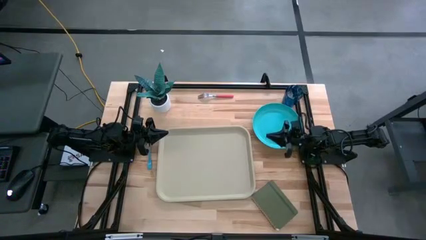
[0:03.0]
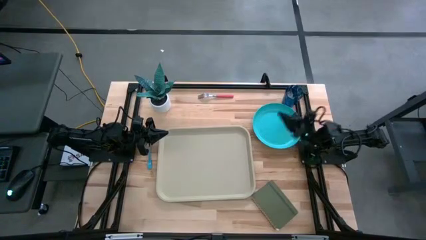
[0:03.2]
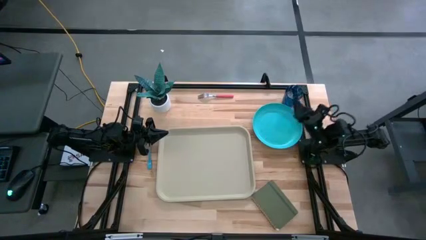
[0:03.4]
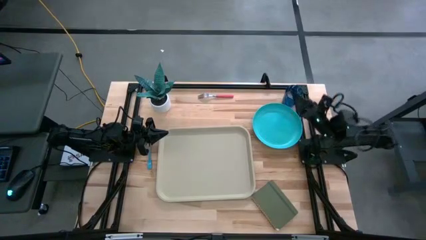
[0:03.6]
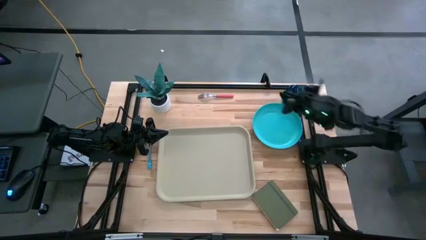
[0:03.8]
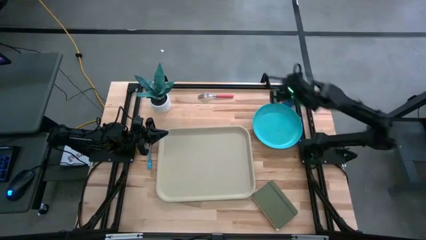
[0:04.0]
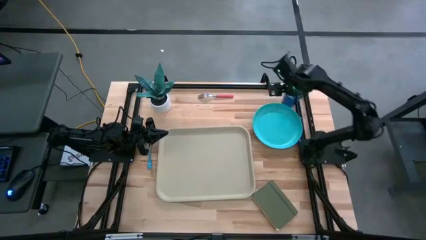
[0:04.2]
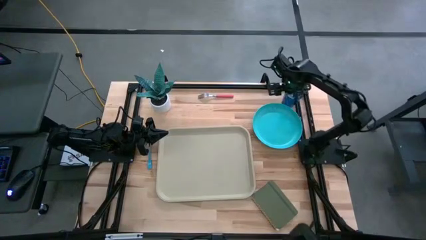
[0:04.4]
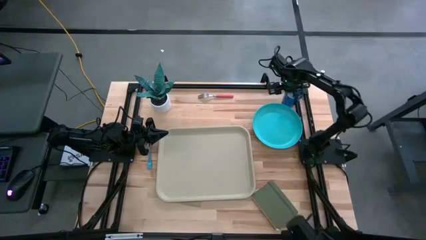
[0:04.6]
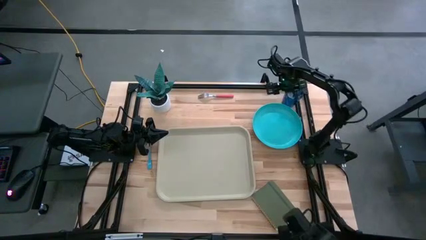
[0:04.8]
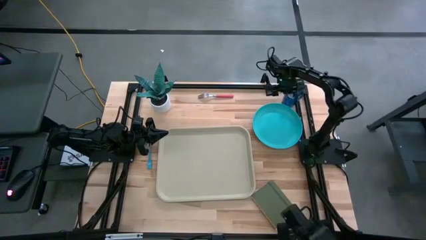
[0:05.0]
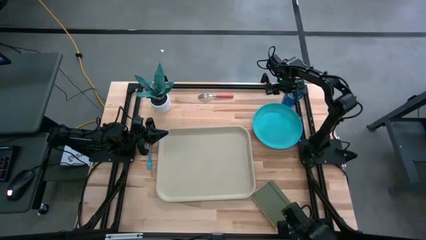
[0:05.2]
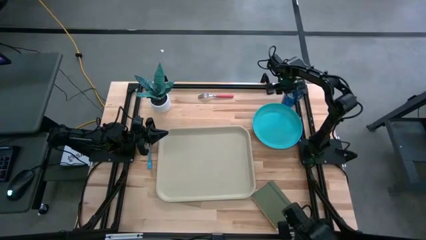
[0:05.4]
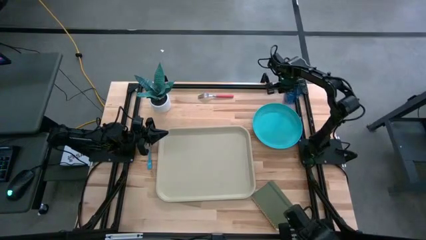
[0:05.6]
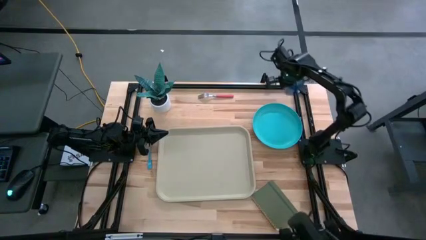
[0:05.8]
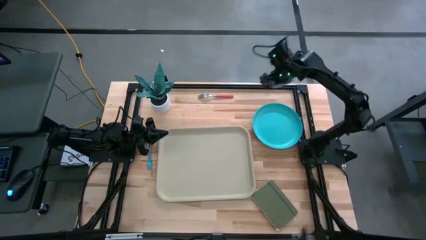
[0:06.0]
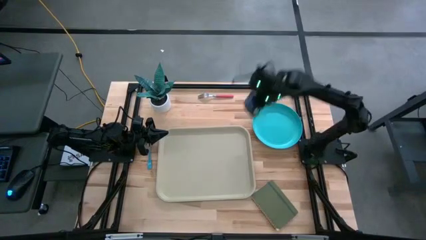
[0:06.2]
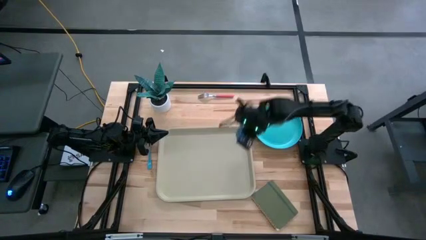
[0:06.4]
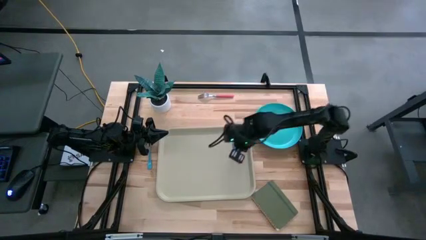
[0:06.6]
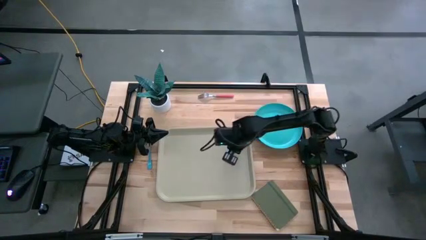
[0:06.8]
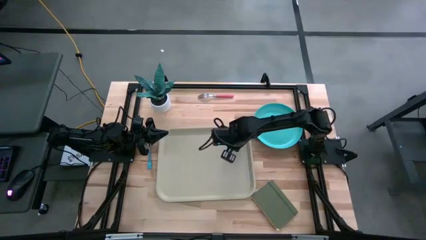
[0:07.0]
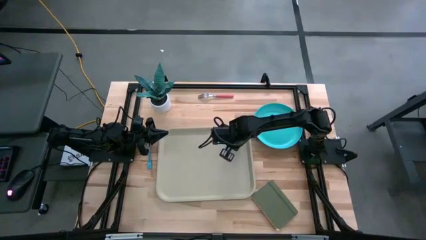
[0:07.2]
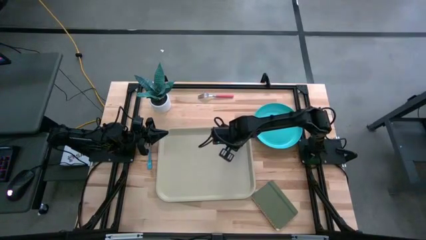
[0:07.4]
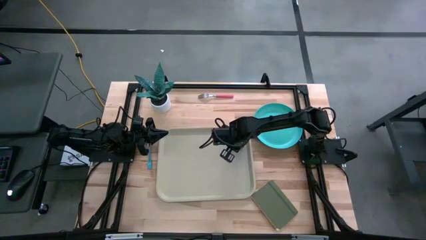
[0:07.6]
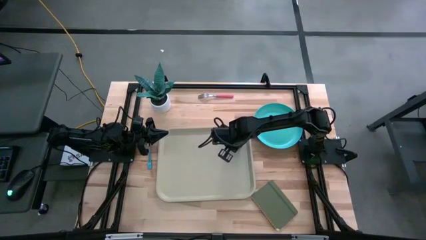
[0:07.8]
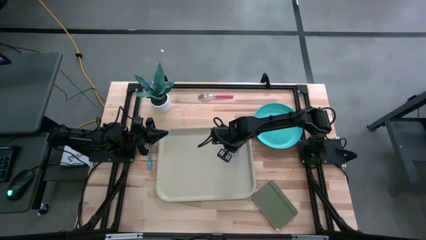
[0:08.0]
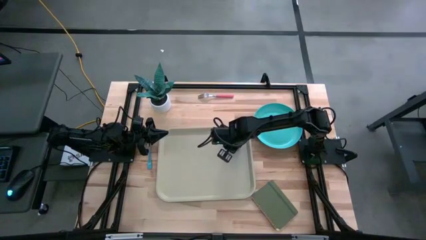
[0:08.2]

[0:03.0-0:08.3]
Task: Pick and place plate/cup/fork/spoon on tray
Put the blue cup on top of the gray tray

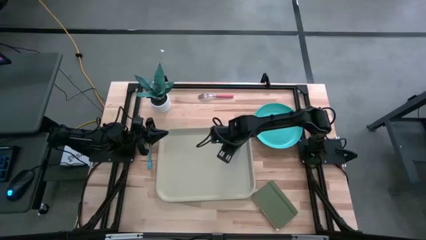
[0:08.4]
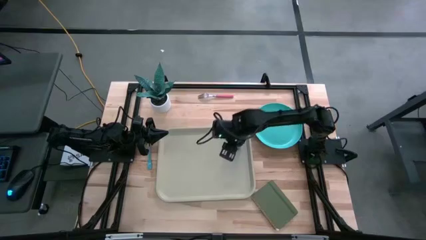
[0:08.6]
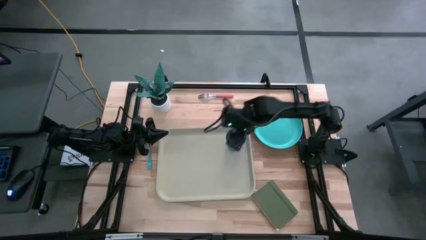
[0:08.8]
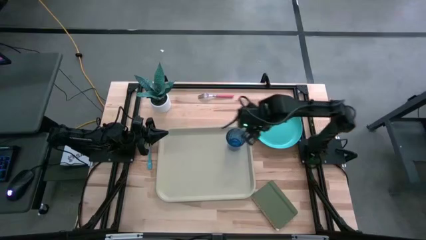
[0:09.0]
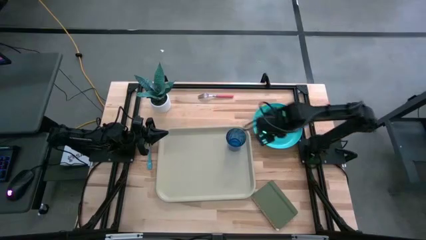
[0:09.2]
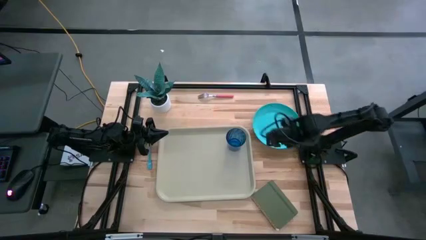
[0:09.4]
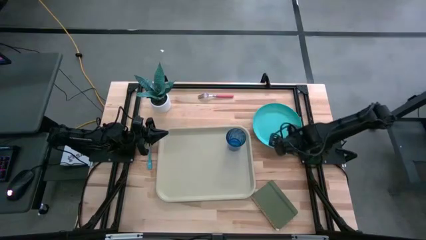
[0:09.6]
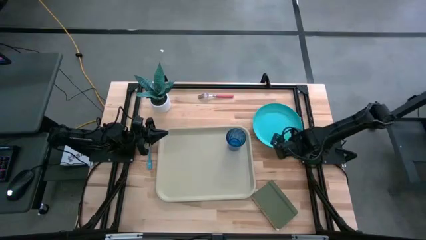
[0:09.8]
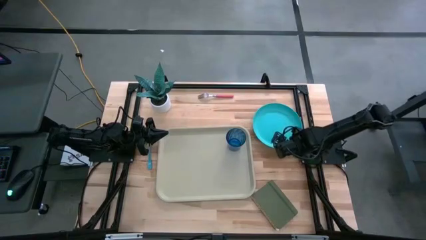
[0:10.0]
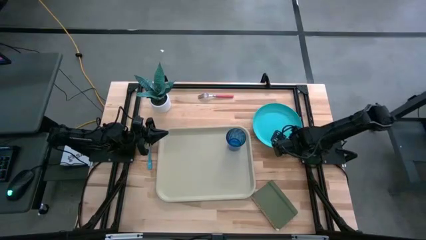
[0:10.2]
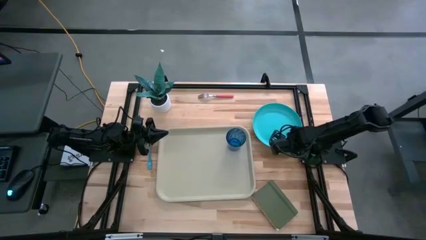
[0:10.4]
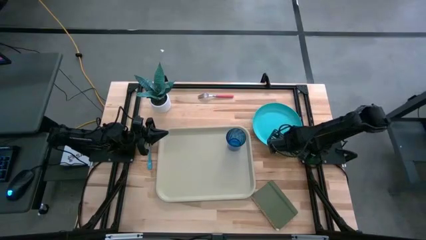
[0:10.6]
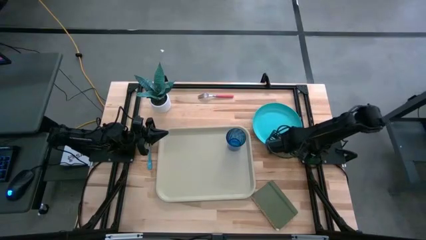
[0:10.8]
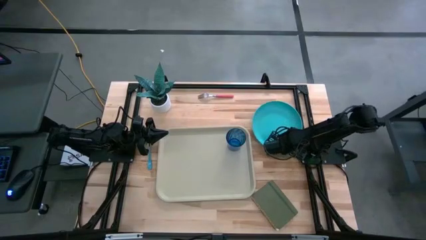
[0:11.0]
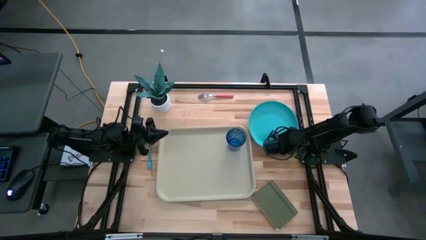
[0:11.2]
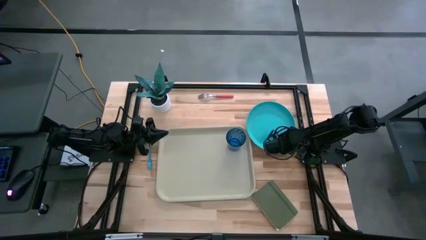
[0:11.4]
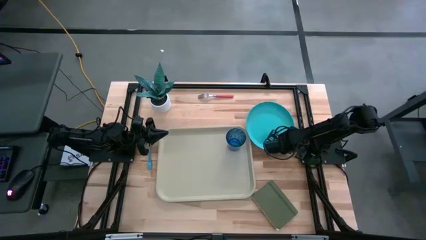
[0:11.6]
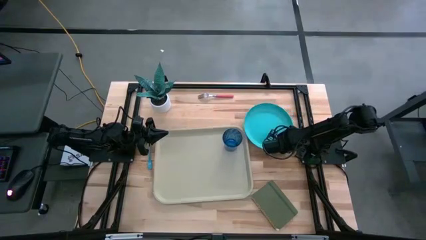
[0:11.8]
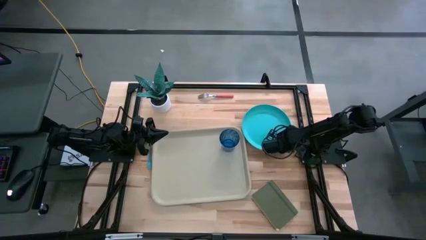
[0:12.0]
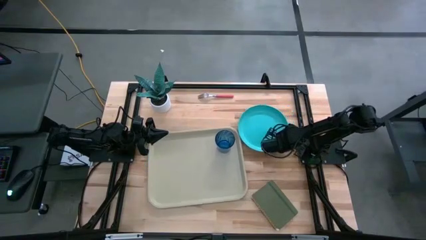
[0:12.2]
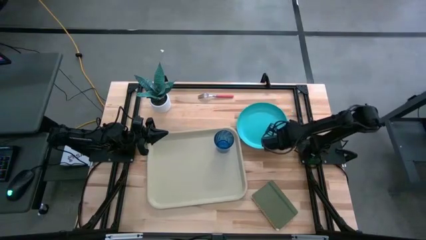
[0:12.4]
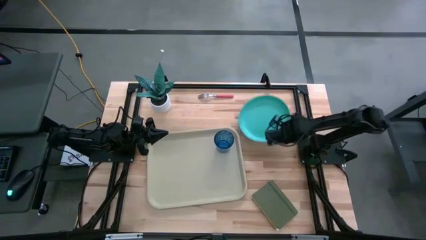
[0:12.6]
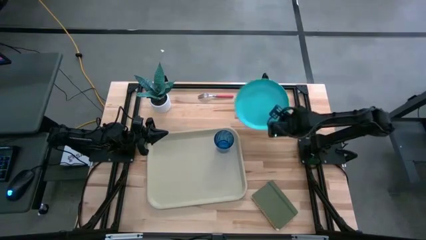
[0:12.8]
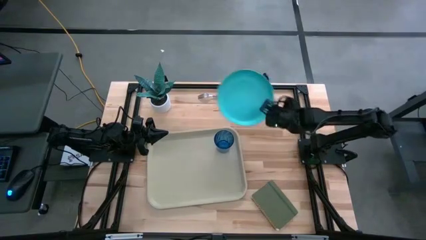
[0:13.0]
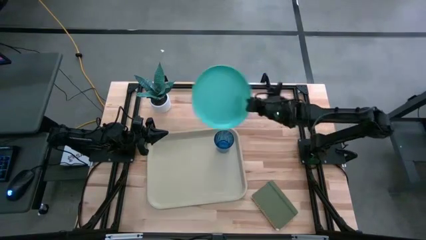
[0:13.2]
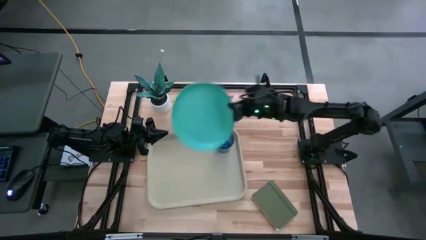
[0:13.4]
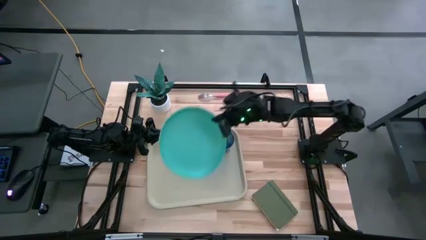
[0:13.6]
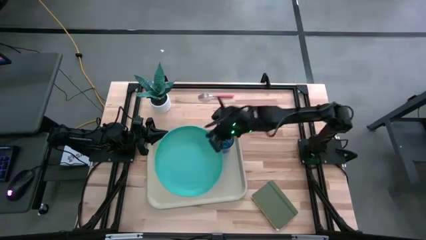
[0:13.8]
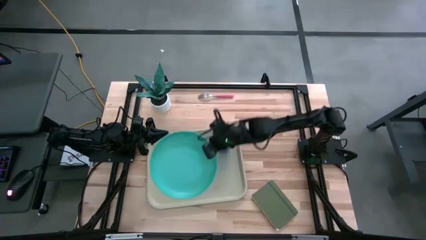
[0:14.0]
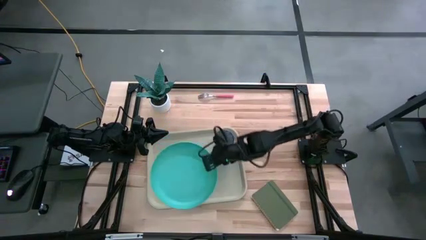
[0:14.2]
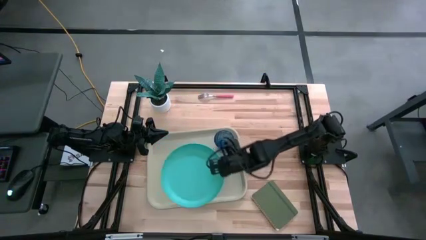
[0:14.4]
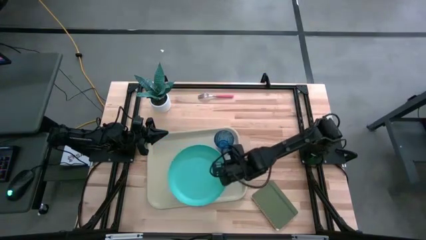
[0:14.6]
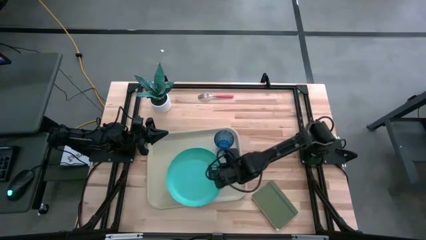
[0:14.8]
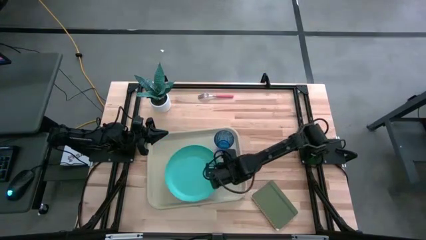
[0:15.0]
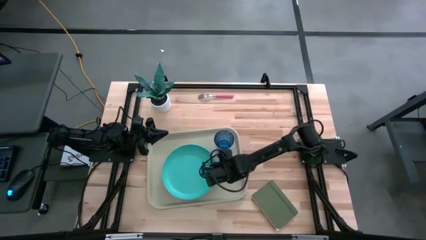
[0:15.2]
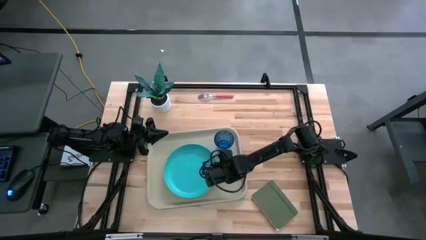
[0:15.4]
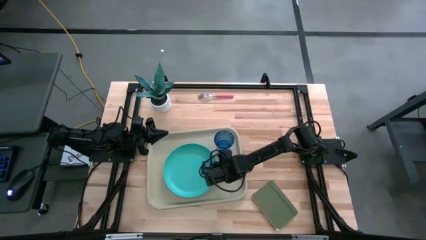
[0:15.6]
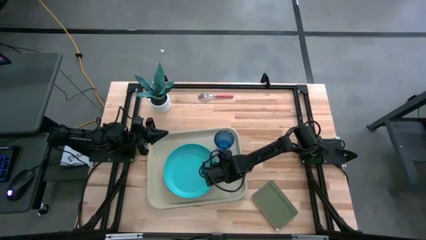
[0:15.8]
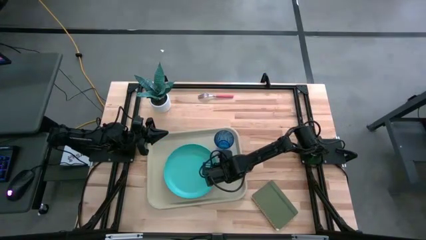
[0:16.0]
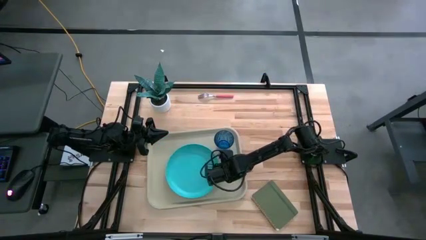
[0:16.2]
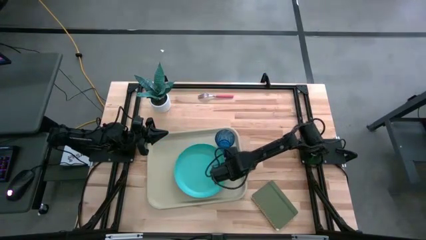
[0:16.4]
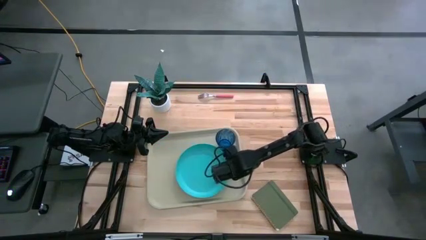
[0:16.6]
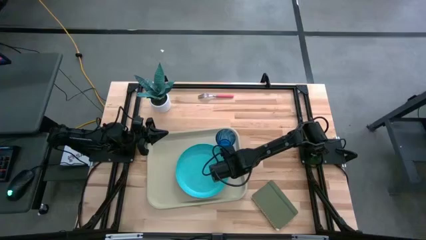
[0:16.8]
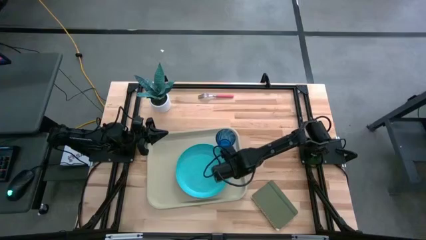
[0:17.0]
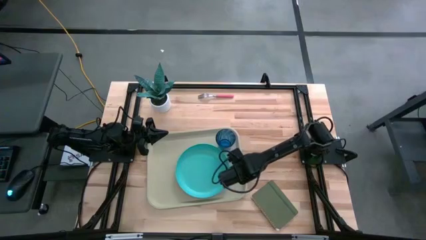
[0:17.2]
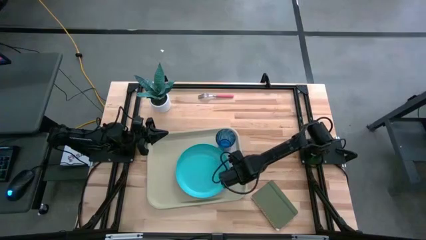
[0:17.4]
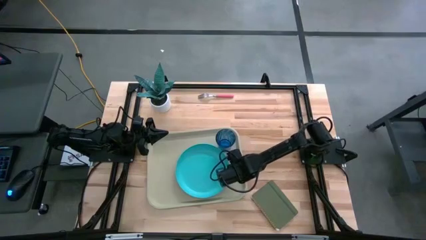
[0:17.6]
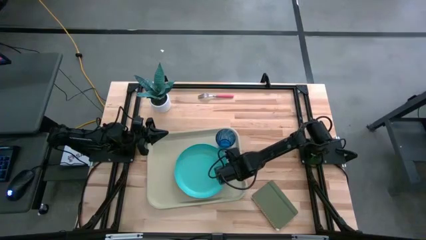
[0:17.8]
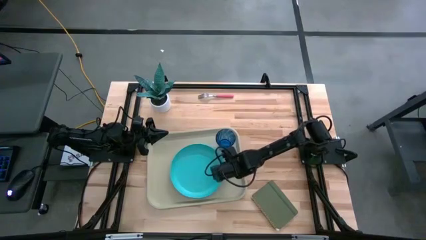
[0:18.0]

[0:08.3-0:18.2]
Put the light blue plate on top of the gray tray

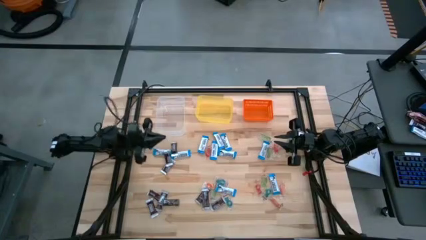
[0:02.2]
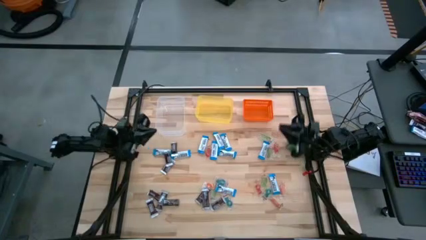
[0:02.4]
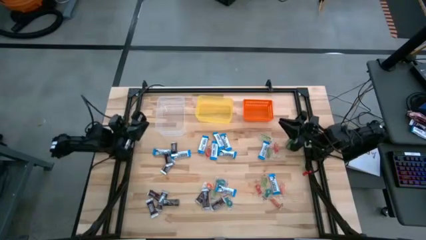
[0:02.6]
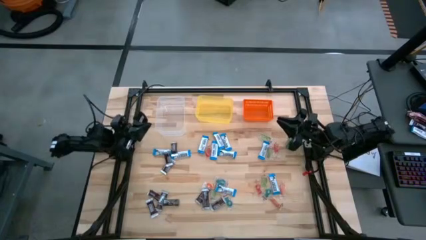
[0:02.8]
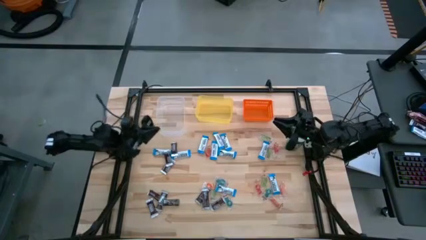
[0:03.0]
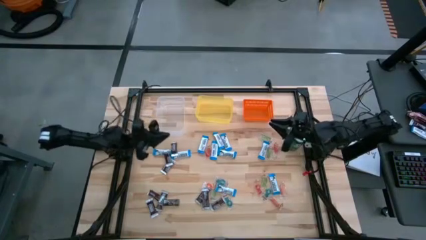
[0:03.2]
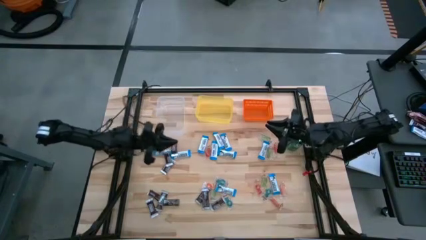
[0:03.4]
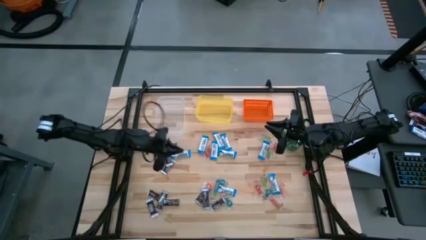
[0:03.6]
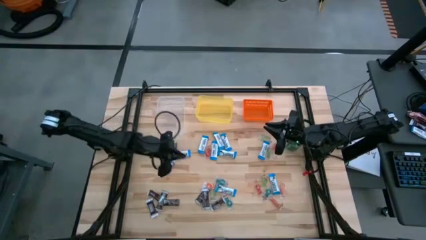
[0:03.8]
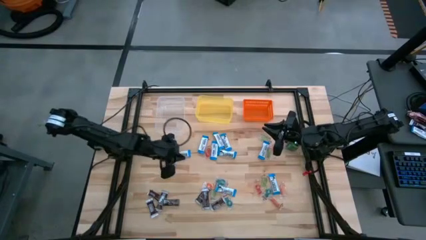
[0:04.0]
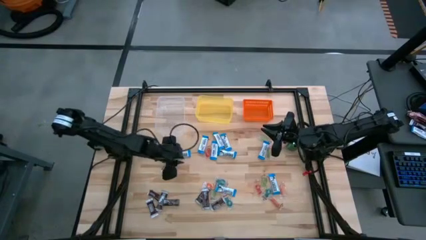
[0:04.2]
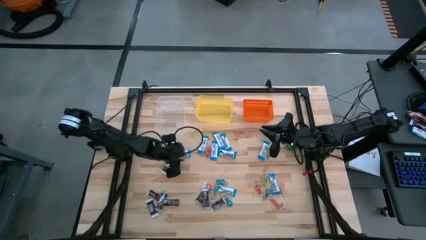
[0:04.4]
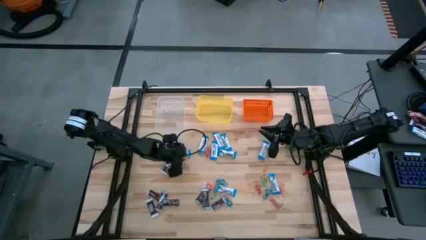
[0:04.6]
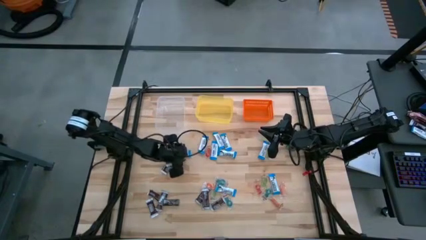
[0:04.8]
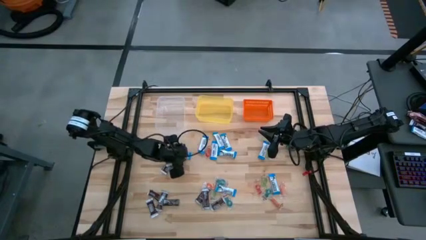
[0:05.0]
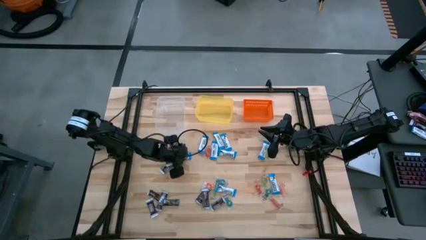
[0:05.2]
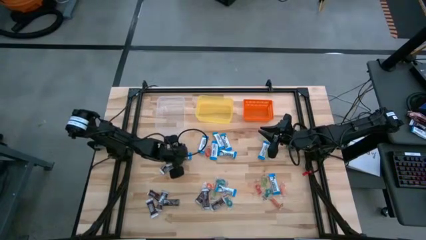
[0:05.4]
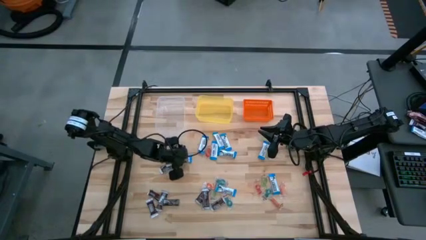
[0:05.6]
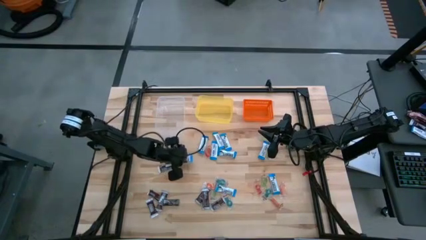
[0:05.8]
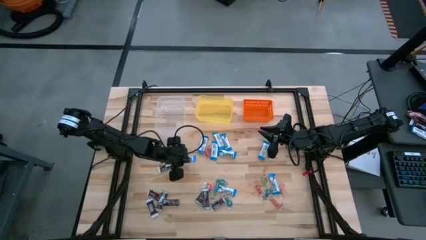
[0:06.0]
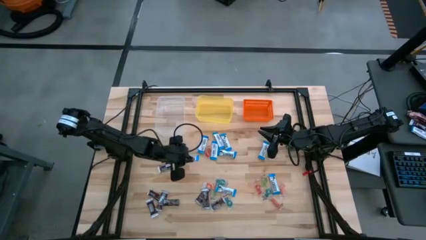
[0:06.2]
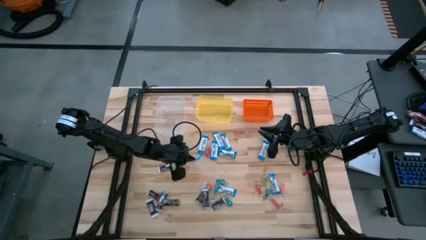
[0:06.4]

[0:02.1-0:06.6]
Task: Sort candy
Put the white chocolate into the transparent bin
